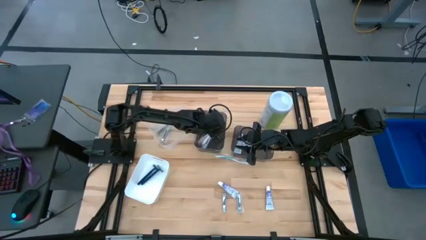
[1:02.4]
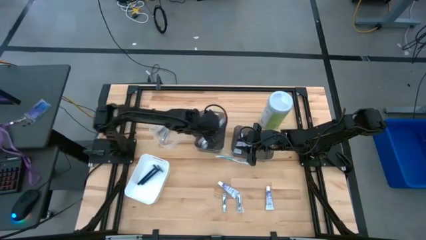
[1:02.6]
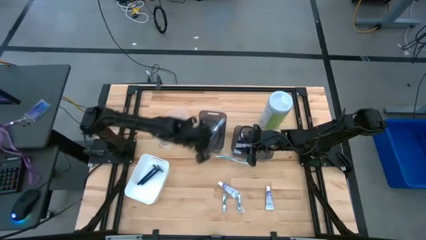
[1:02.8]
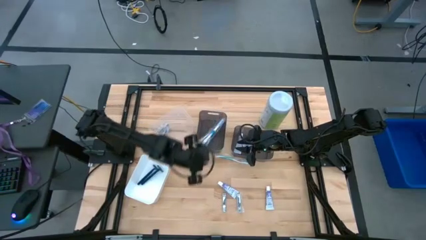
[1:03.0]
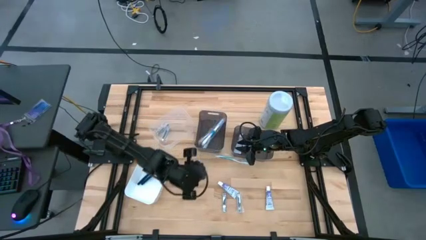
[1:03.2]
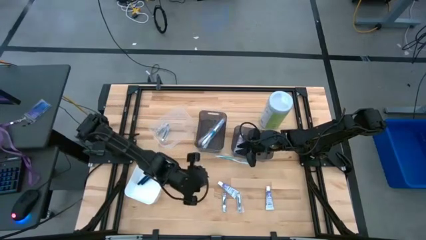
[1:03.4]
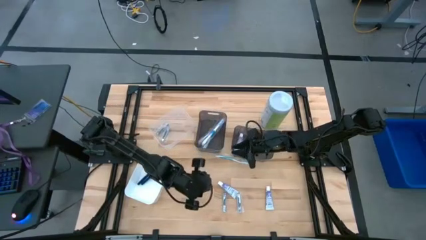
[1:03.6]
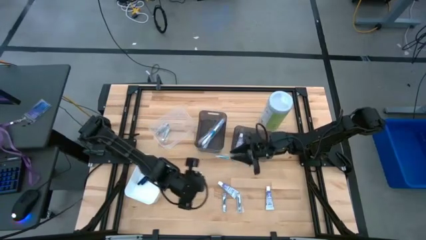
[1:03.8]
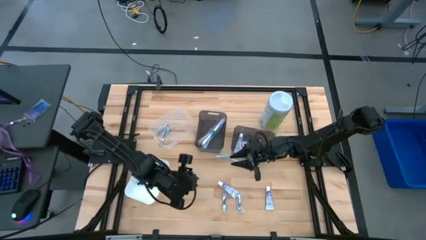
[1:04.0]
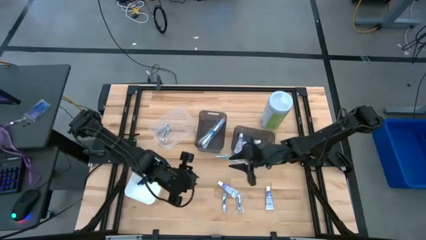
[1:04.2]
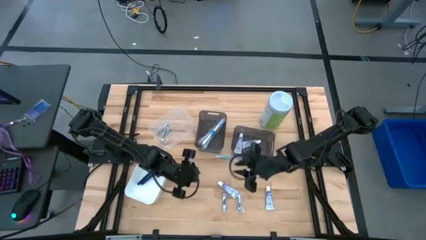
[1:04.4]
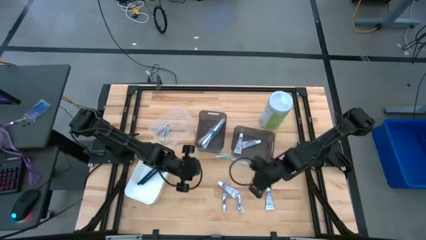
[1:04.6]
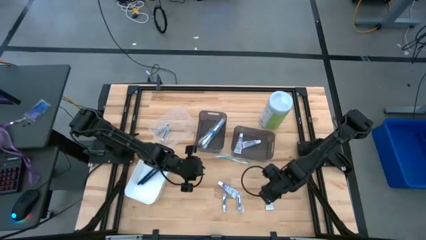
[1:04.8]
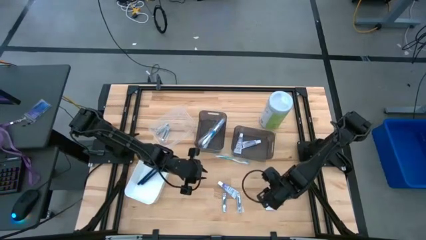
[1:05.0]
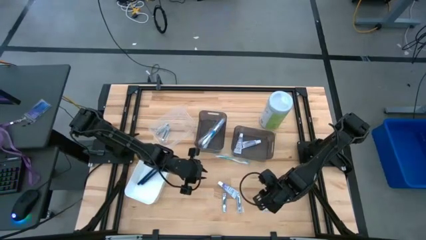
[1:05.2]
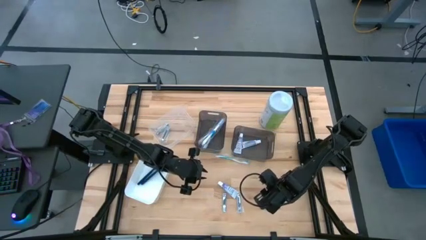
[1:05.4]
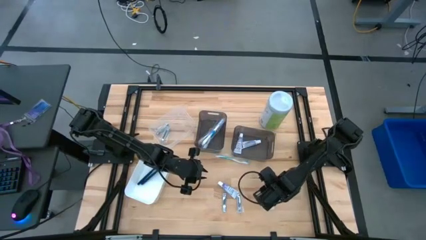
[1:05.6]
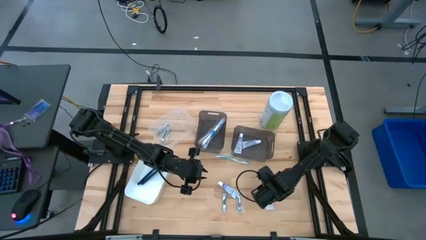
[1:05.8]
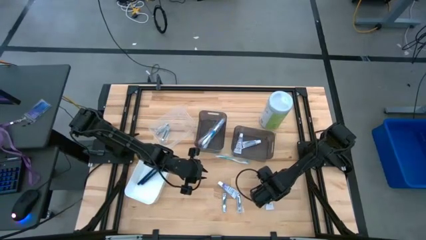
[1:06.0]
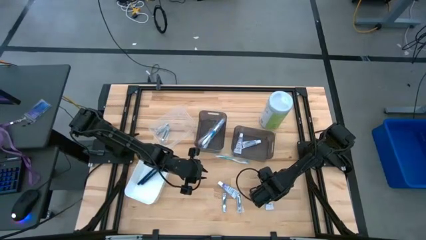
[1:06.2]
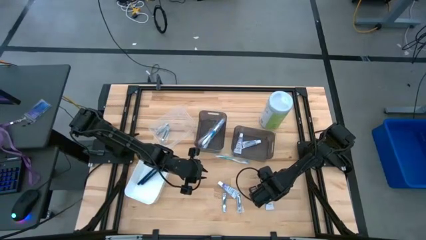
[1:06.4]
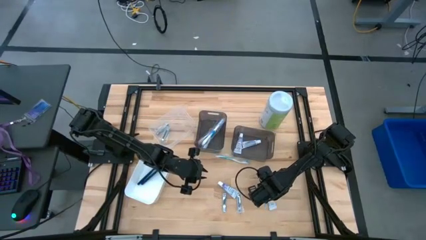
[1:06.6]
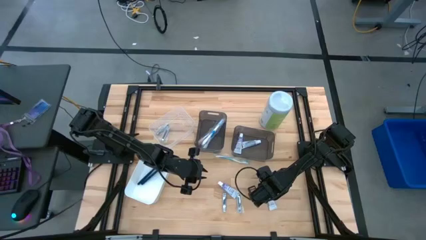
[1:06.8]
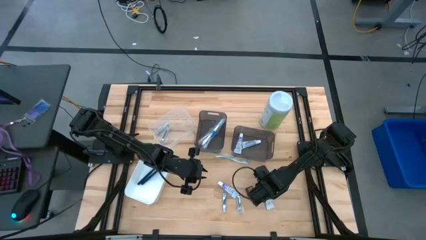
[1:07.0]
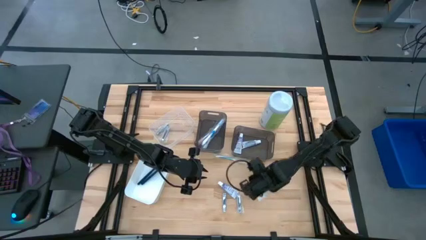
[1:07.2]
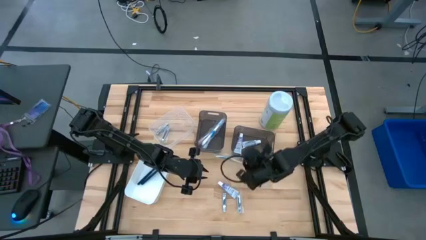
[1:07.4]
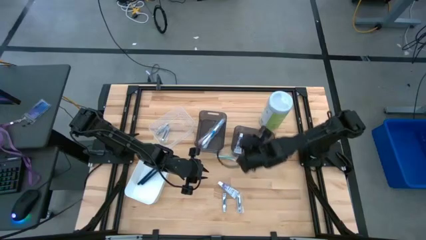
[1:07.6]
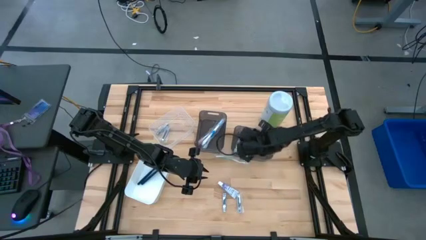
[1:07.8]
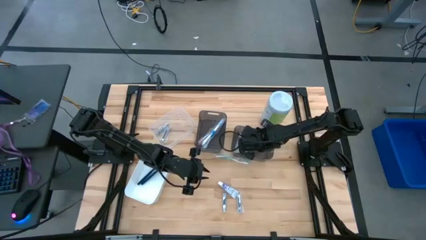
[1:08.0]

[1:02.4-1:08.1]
Task: Pick & Place Travel size toiletries
Put the white toothpaste into the right black bin

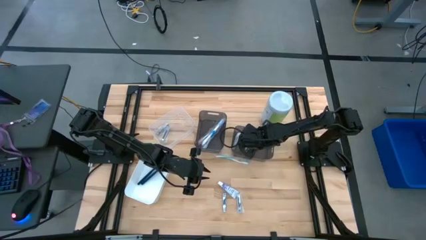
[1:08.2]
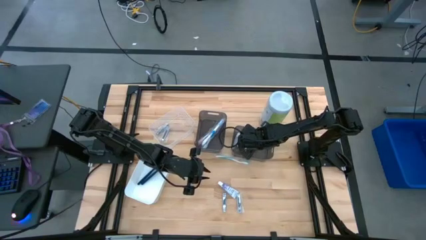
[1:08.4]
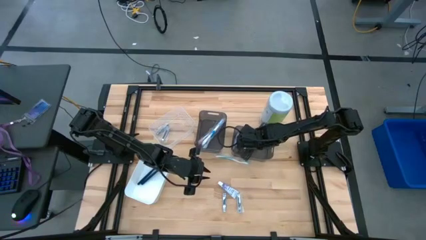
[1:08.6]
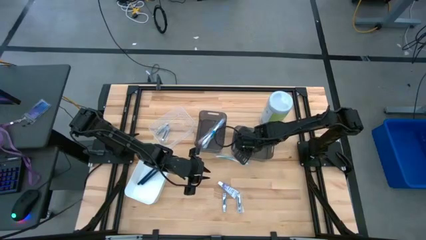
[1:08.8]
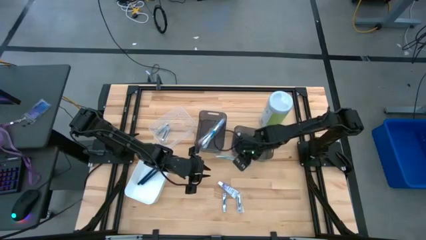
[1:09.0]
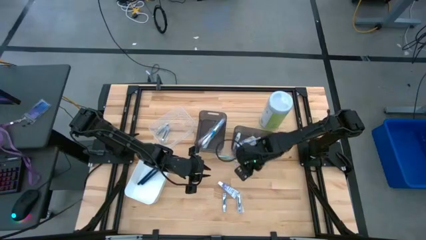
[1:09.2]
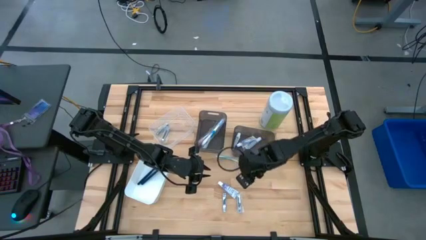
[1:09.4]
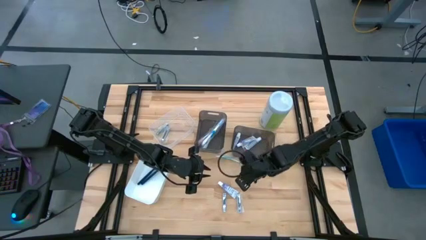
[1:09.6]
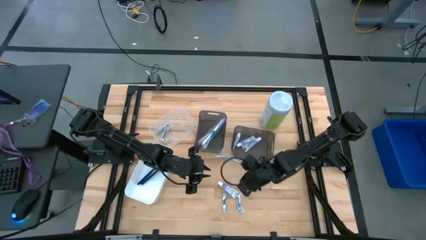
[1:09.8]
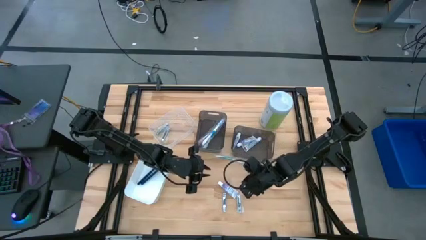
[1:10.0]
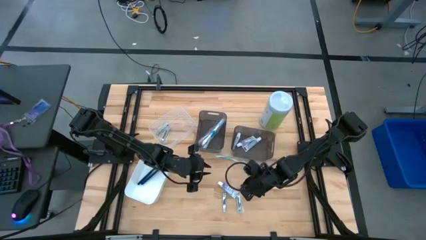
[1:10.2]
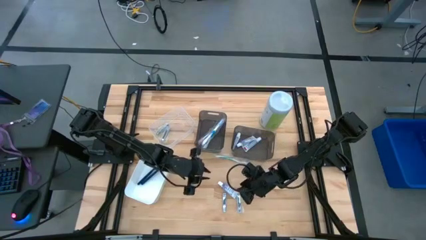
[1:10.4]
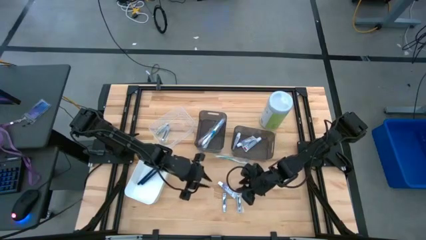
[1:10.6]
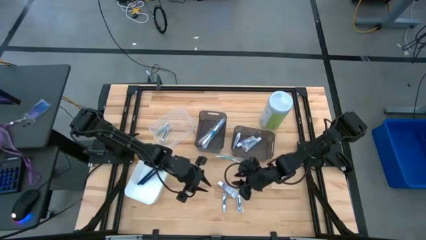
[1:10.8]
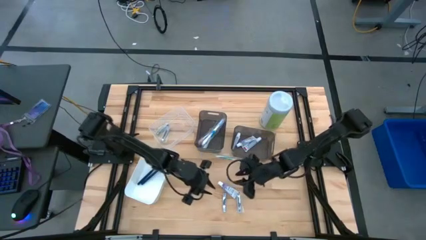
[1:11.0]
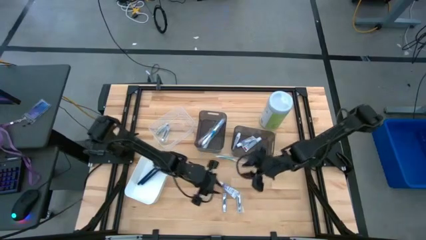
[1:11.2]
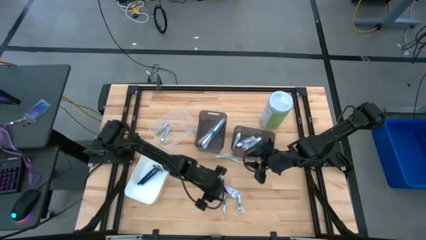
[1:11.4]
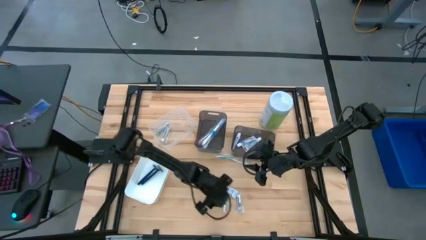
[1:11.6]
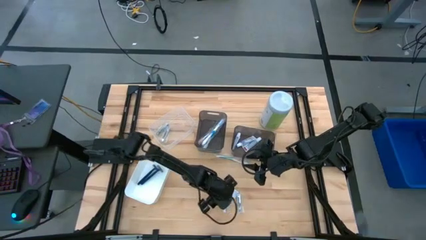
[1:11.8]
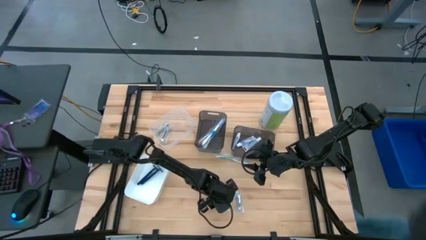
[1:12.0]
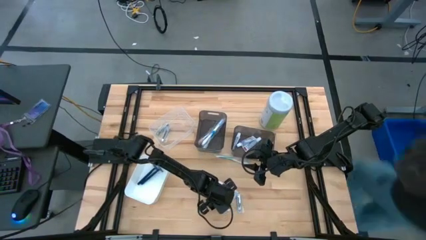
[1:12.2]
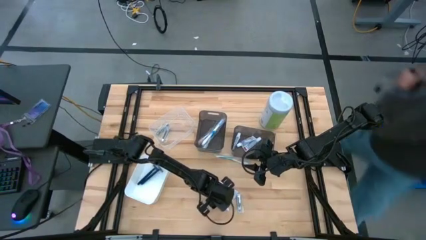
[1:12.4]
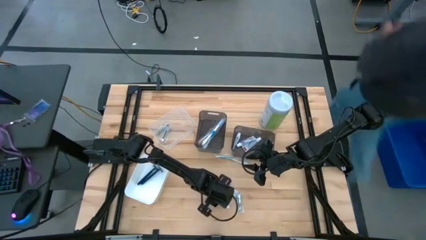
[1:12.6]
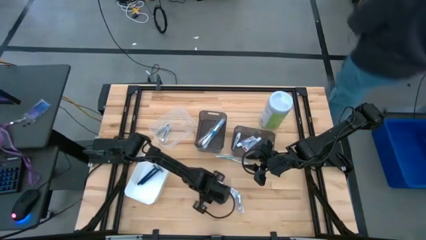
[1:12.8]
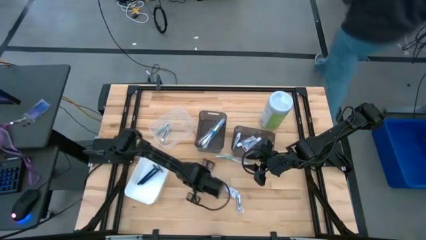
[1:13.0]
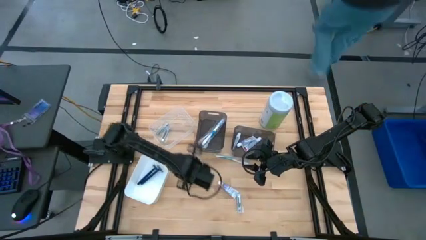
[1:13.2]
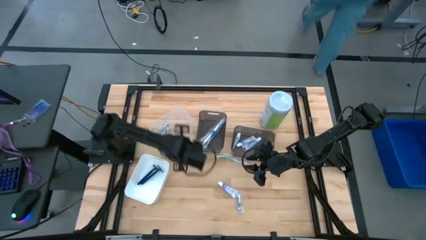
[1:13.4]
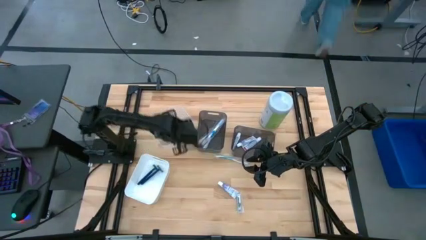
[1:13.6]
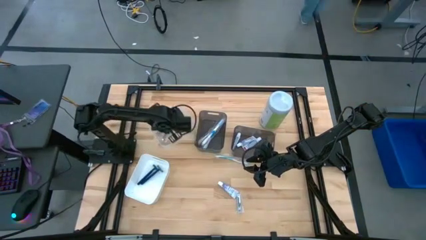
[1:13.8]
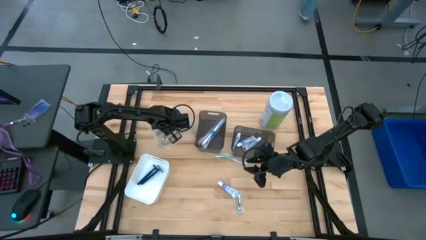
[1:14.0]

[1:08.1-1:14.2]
Put the silver nail cutter into the transparent bin

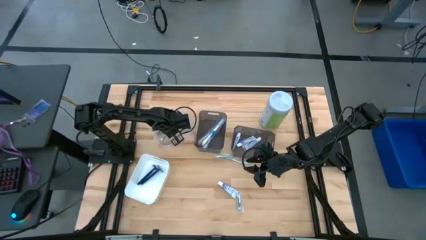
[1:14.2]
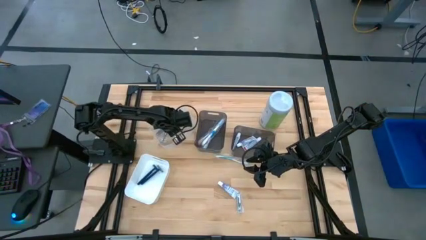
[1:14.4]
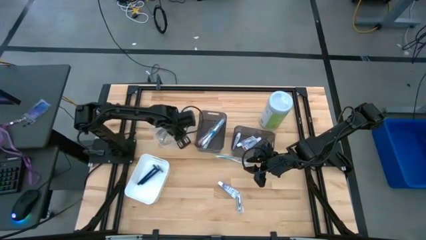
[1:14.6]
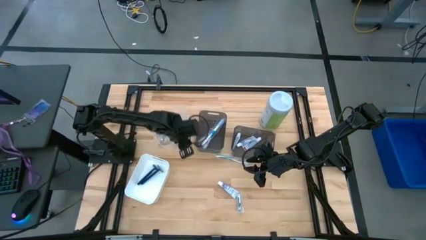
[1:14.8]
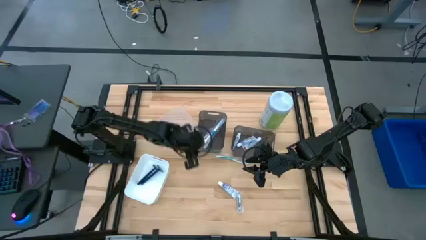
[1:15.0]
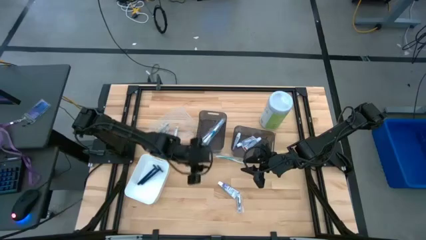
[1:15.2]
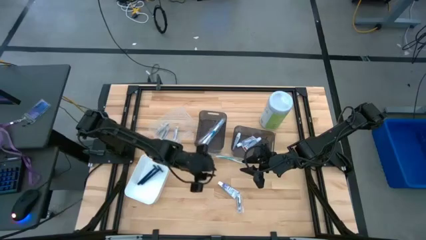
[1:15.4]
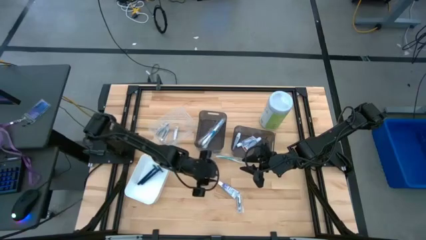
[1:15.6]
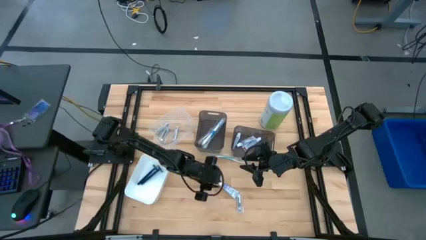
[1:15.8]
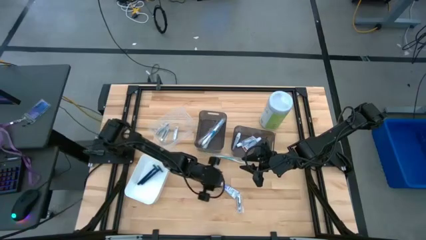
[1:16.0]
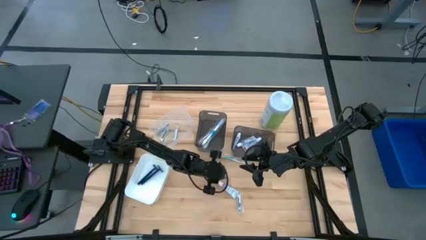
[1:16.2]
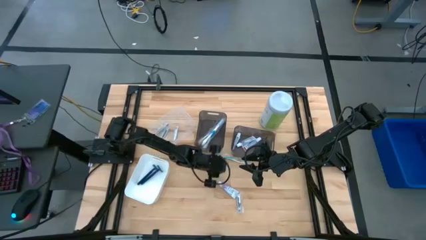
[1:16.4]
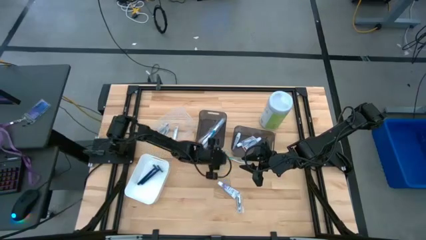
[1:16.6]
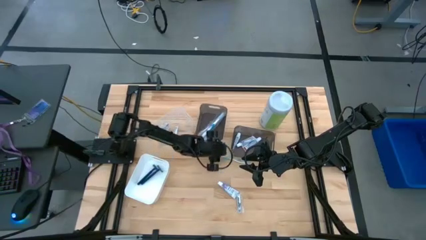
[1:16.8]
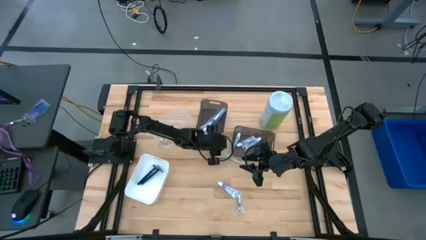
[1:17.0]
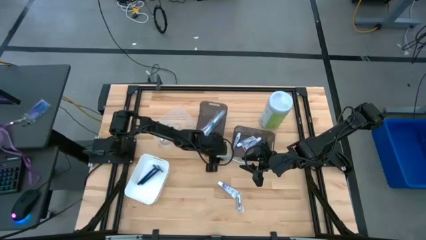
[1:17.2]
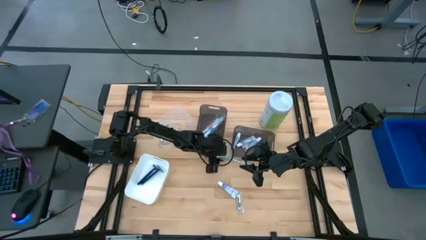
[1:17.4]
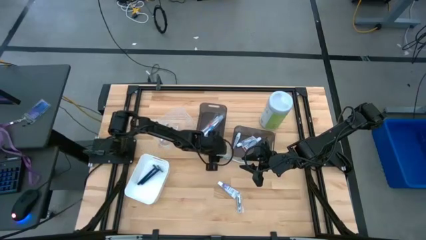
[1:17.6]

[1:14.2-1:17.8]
Adjust the left black bin
